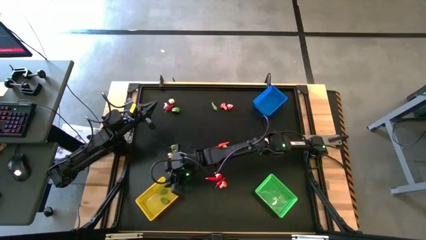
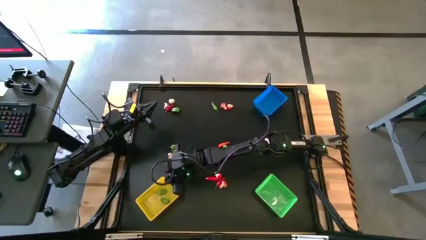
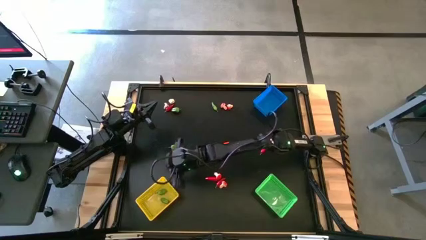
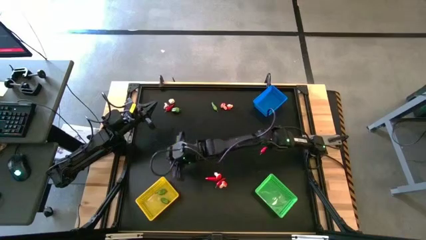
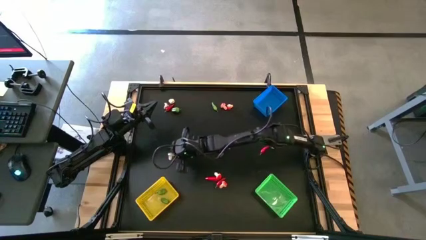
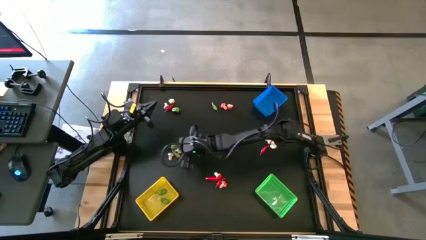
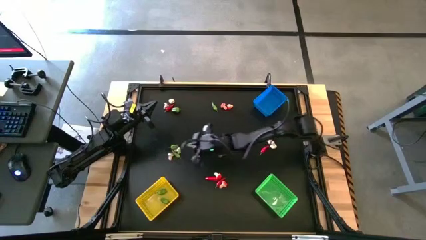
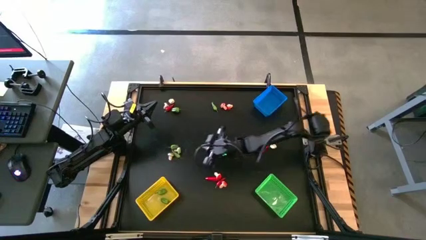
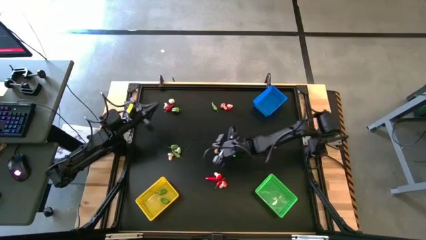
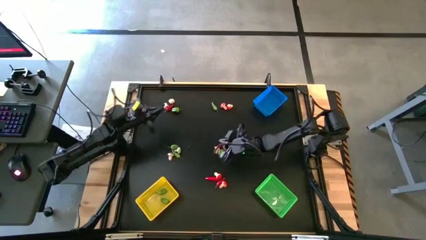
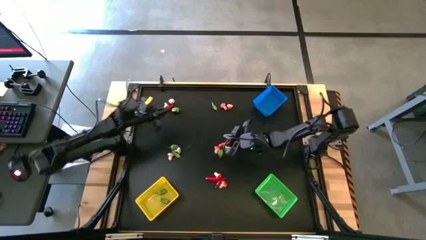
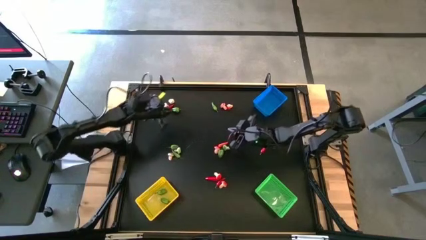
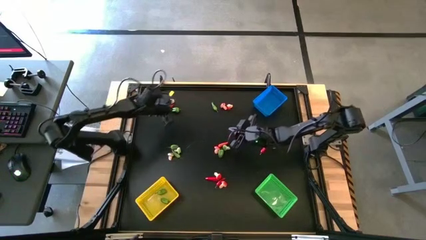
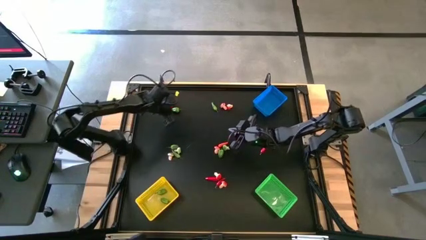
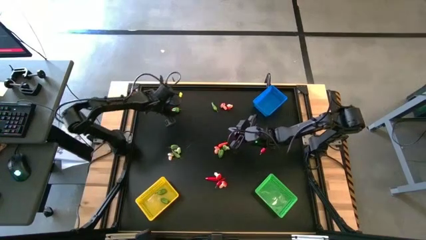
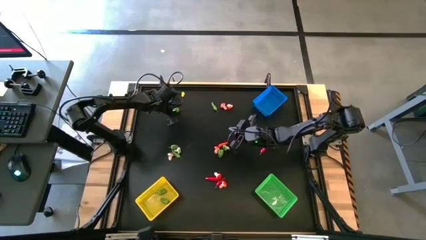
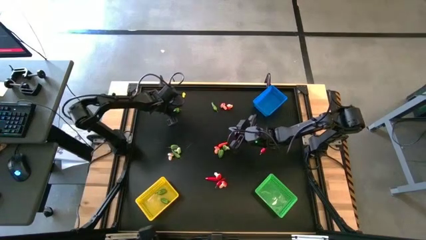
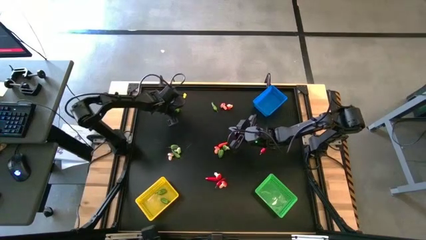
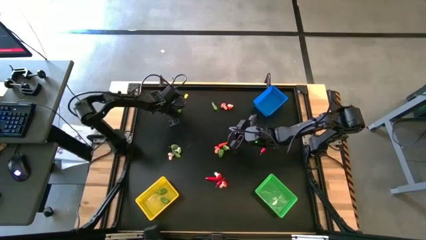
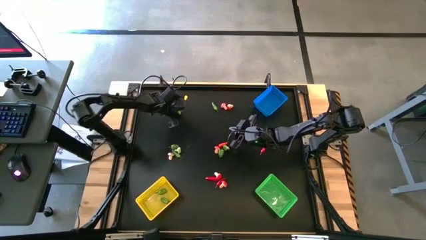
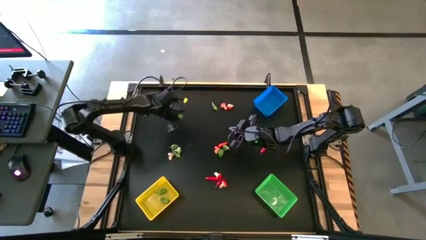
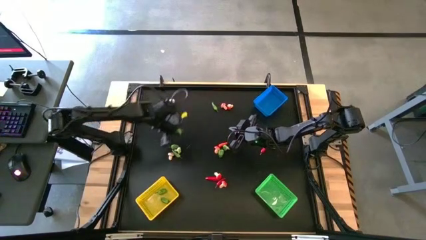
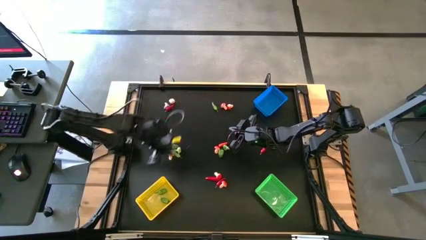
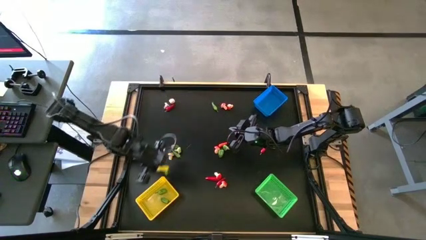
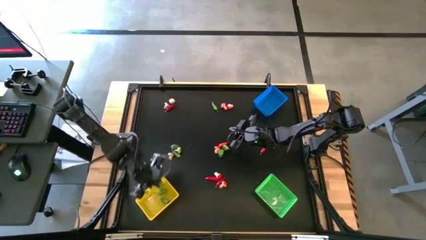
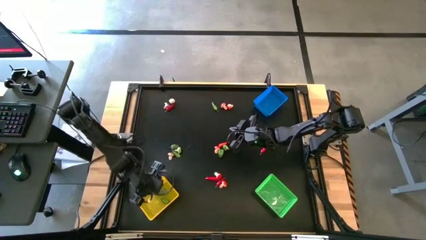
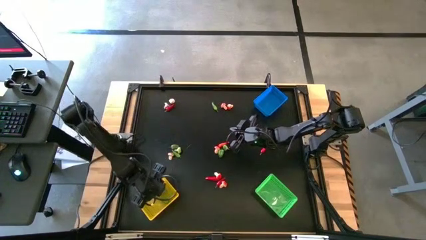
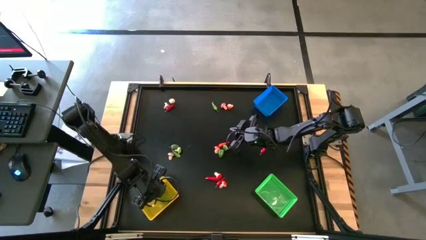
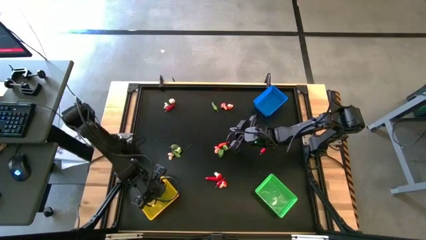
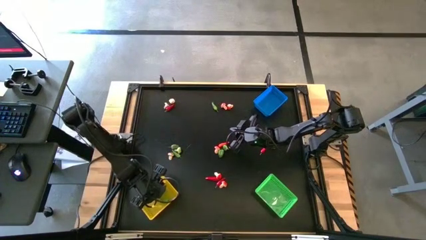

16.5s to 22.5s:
Task: Sort produce into baskets
Put the green chili pepper into the yellow bin

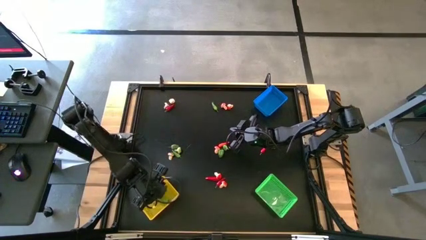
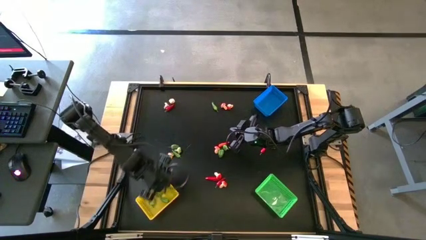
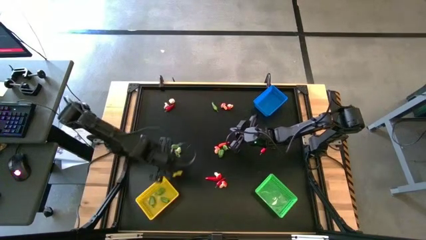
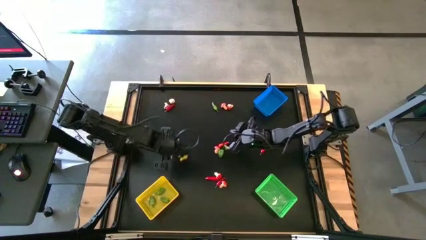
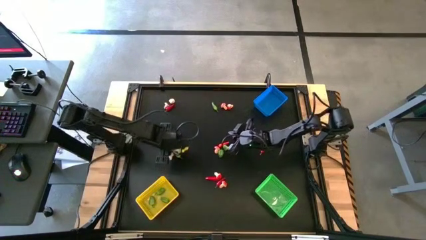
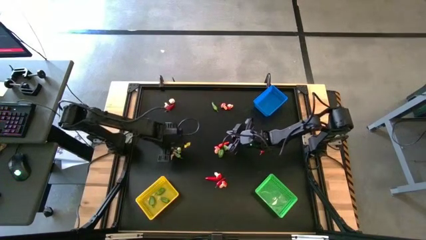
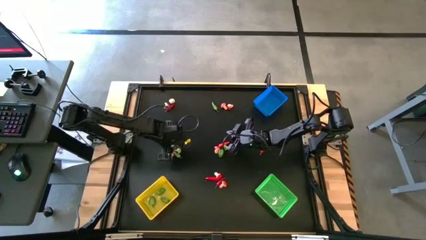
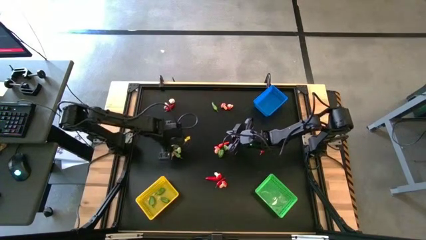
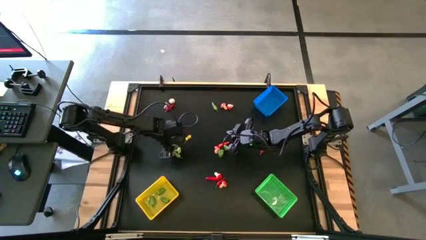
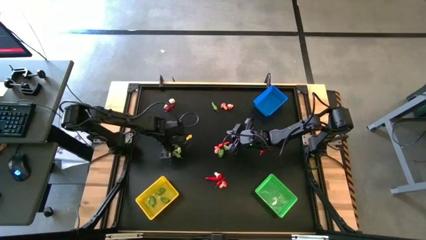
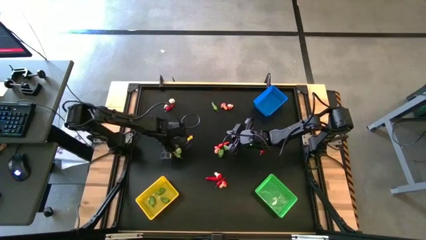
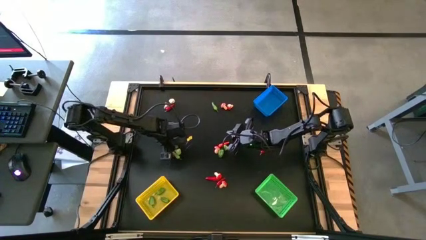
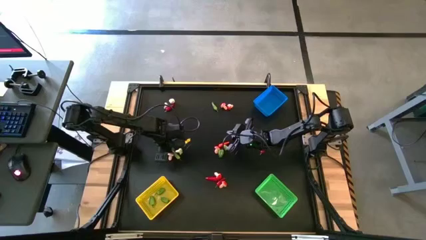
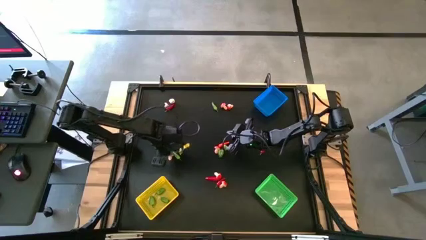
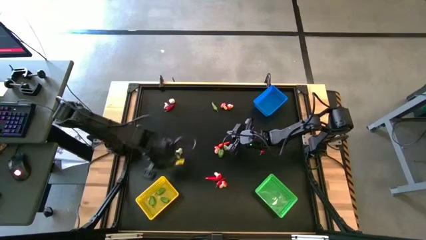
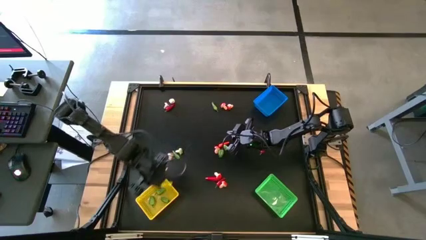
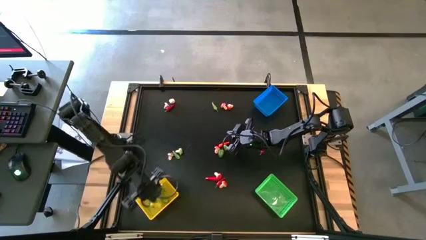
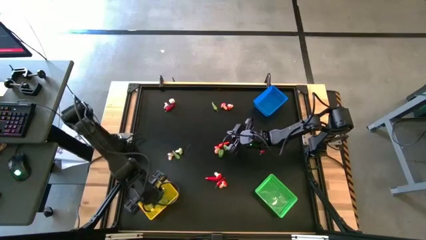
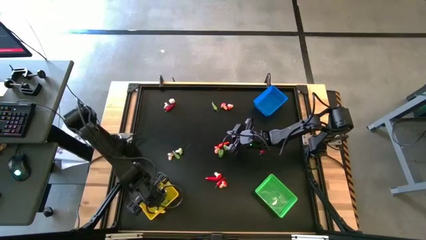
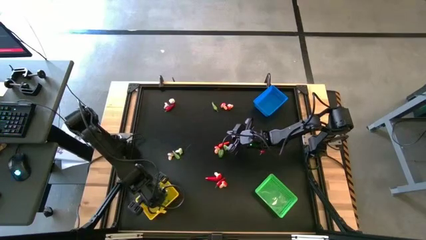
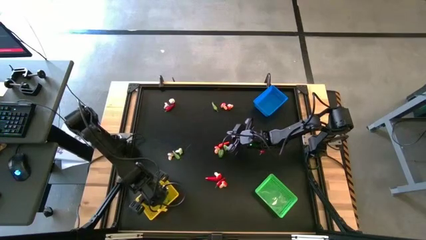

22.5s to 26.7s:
Put the green chili pepper into the yellow bin

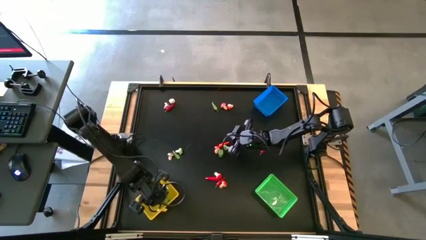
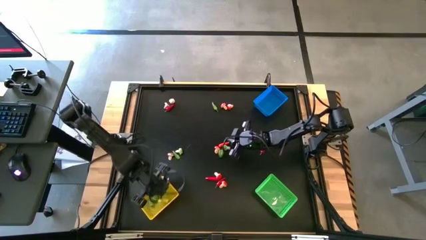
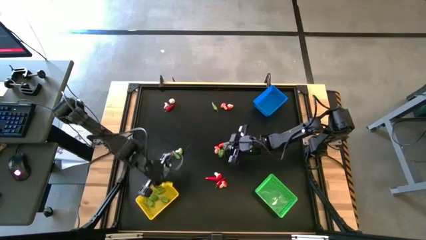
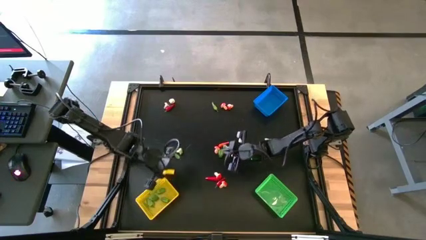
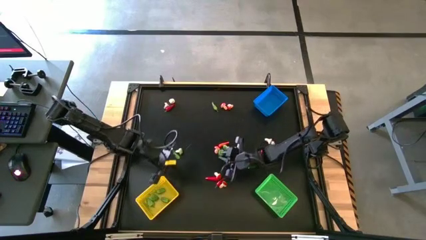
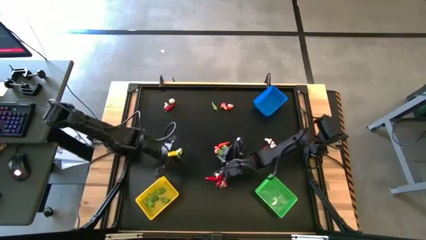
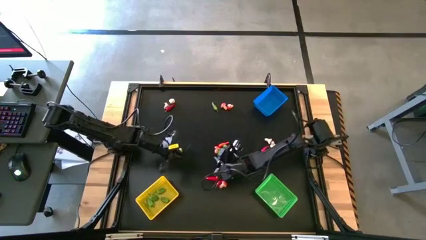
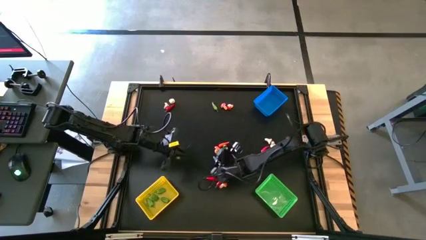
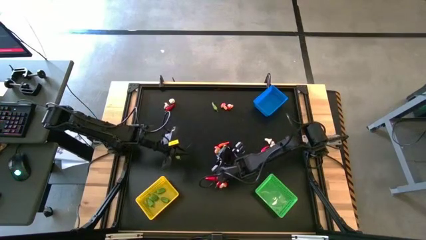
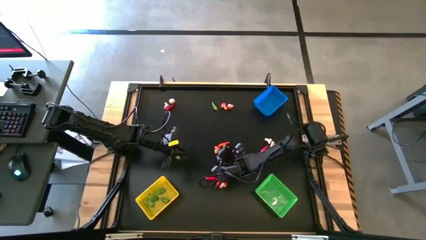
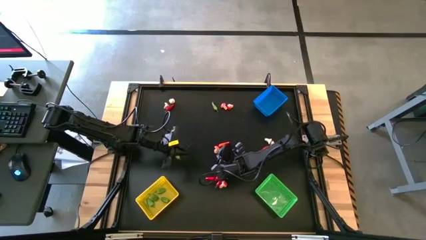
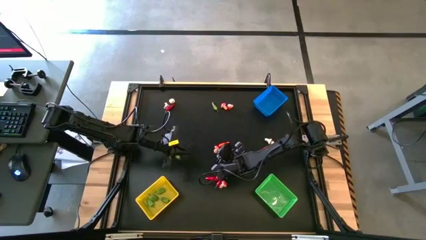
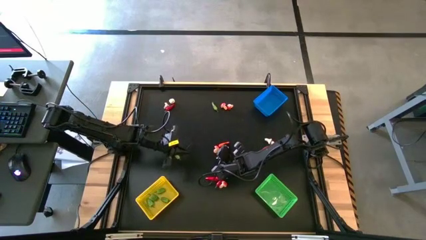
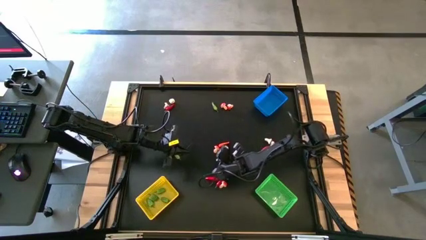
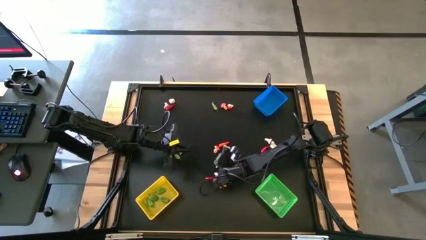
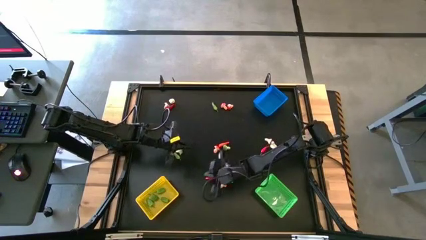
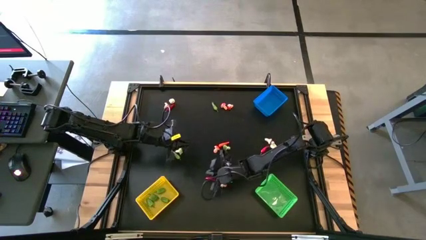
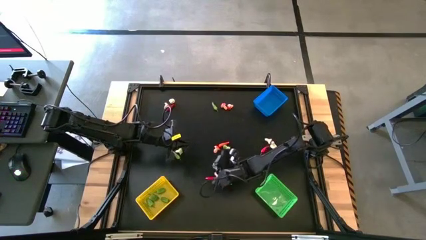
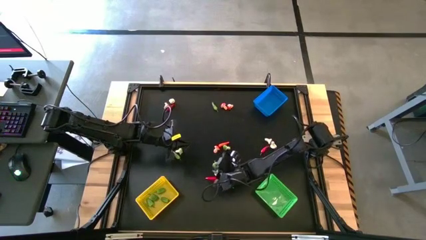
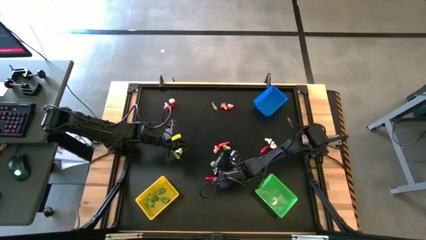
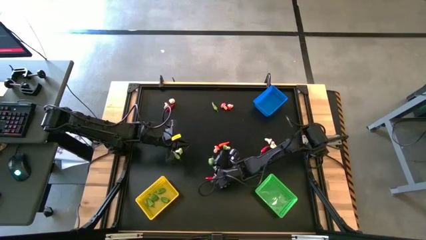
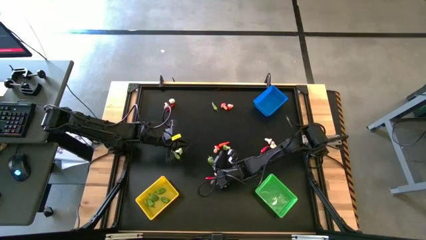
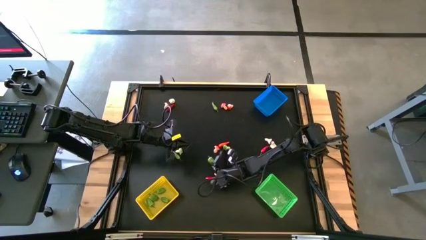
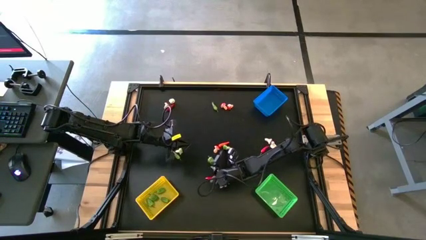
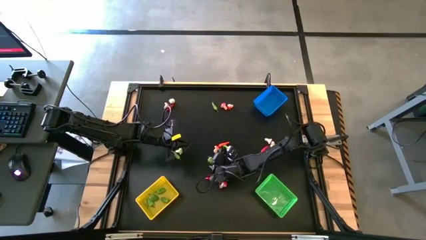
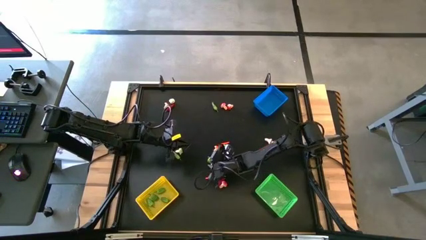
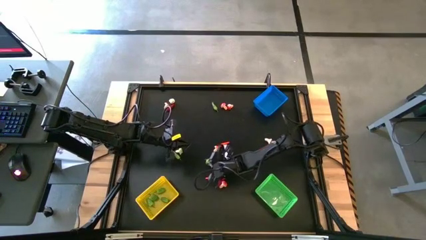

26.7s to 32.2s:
Put the green chili pepper into the yellow bin

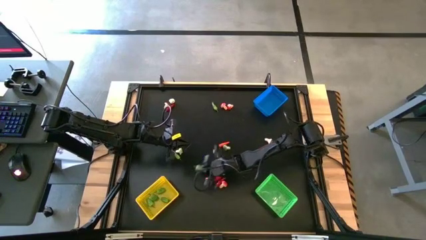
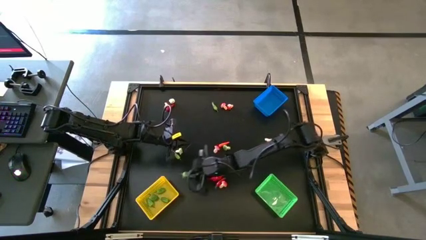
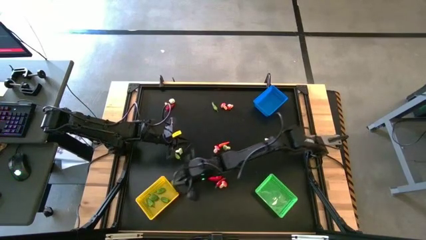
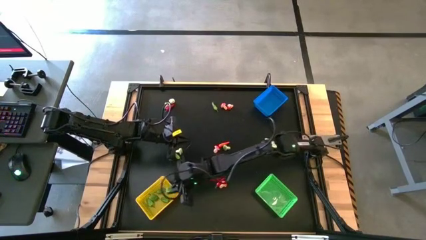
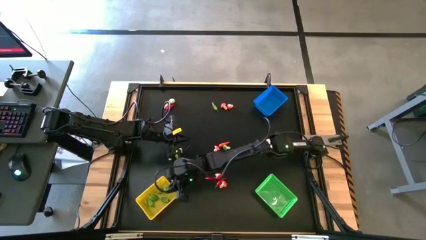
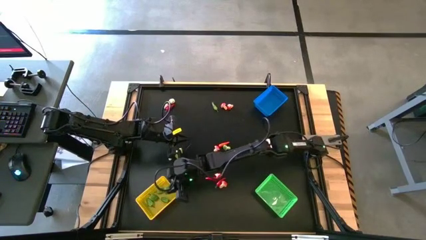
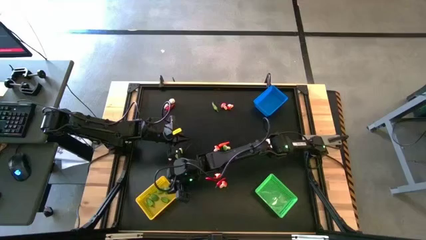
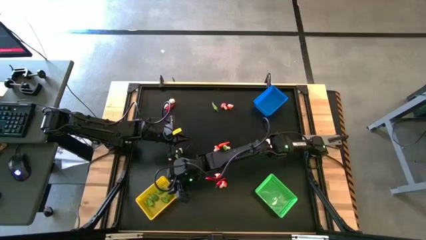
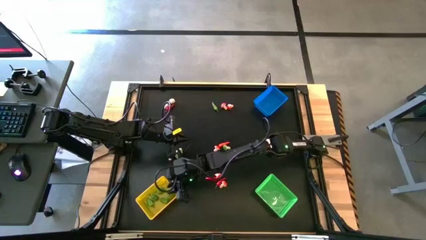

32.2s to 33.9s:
Put the green chili pepper into the yellow bin
